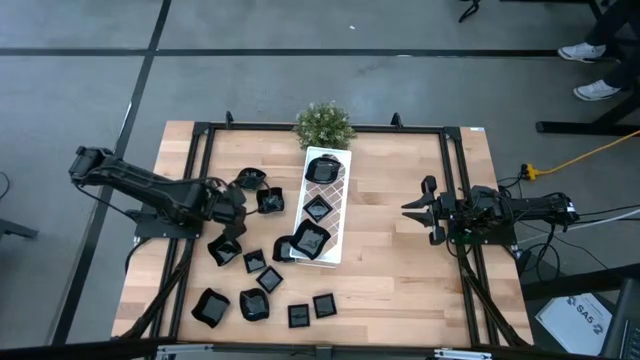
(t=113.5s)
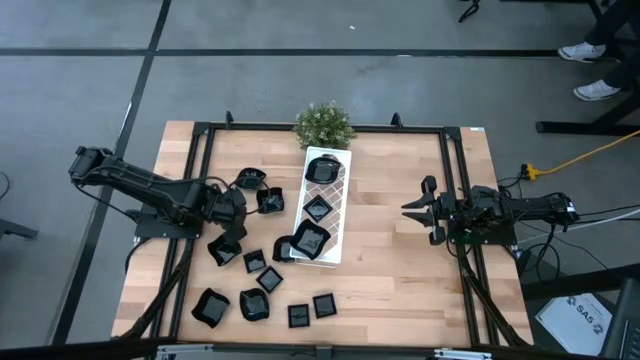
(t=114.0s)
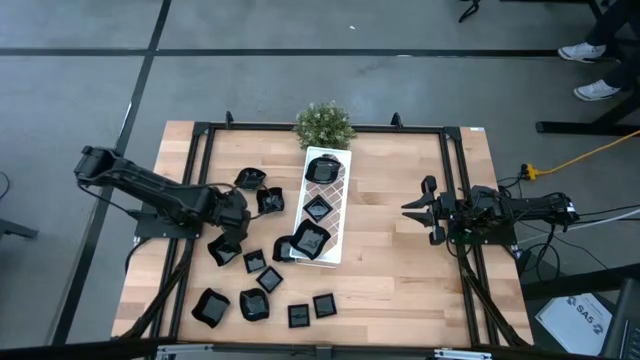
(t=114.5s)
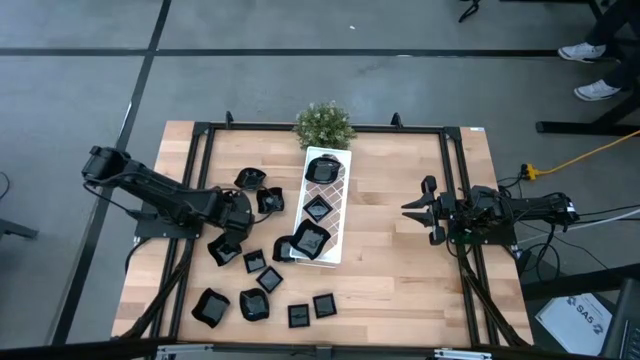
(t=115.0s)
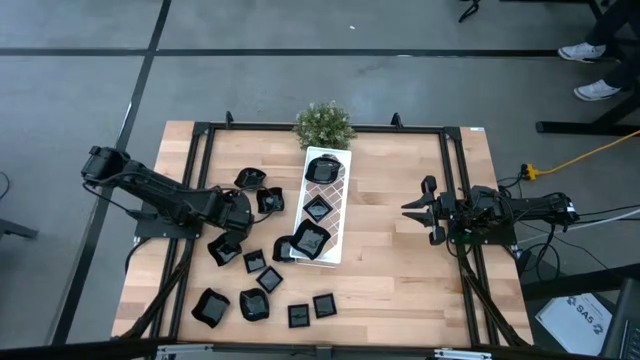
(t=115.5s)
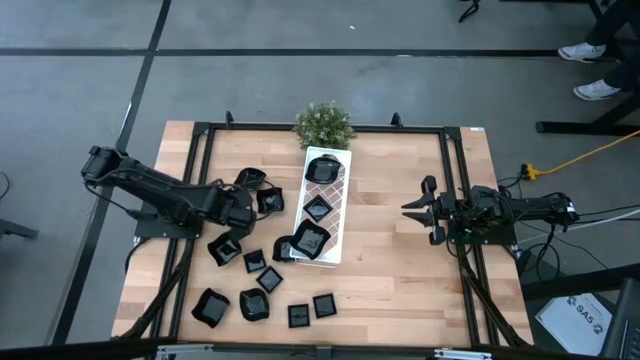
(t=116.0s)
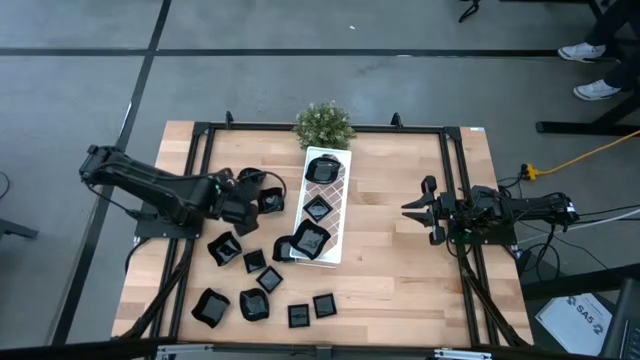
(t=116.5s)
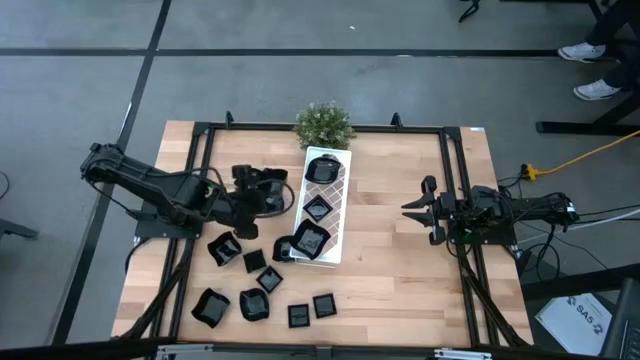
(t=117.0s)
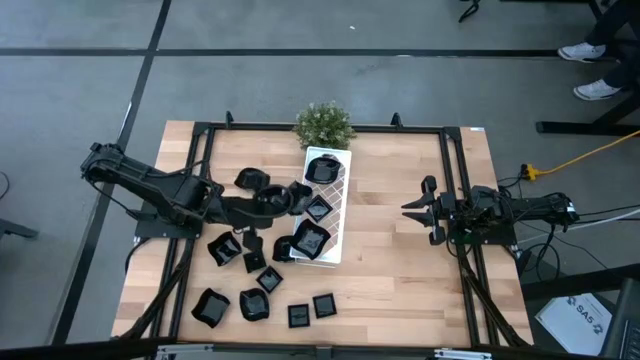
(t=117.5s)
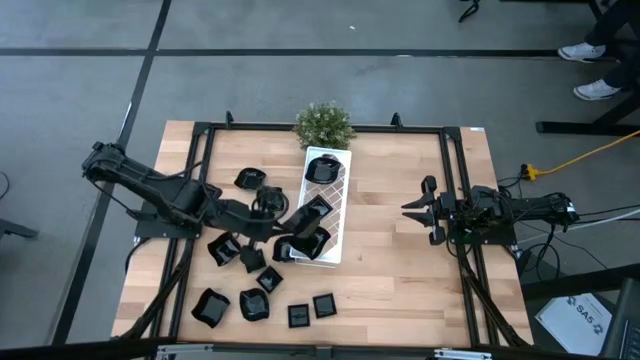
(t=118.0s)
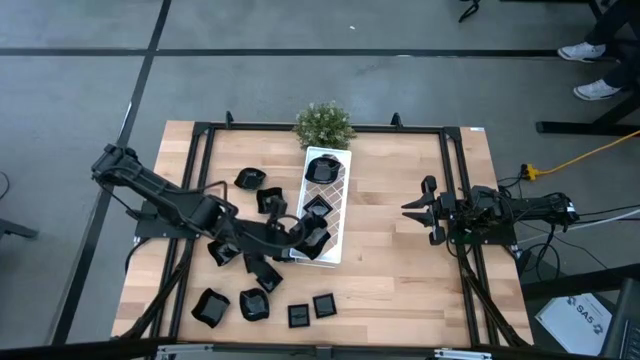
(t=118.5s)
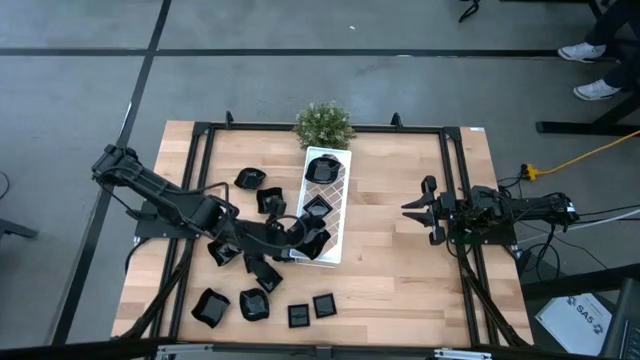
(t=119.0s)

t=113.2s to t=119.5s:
Task: Pick & Place Mini shaped plates
Stack the distorted square plate on top of the distorted square plate on the shelf

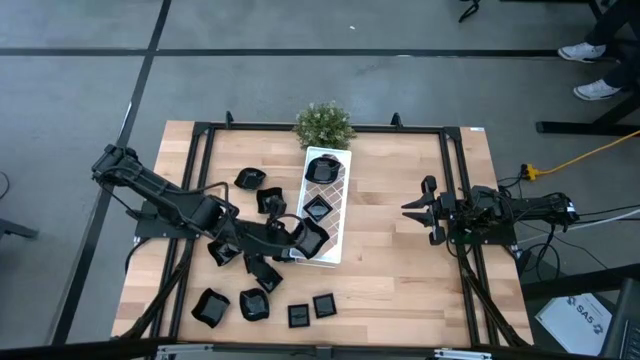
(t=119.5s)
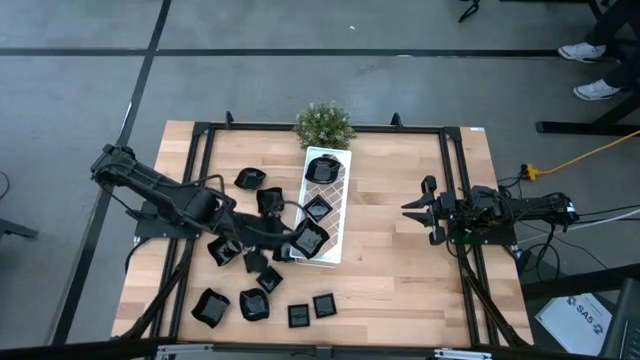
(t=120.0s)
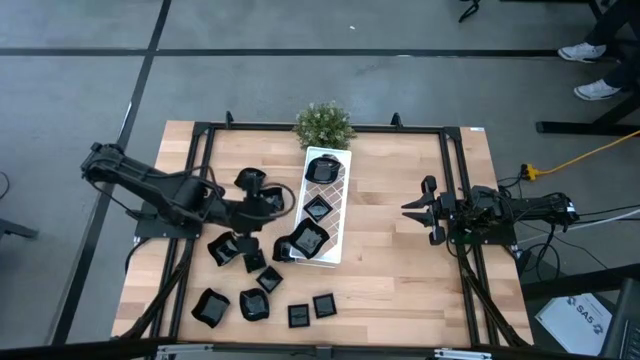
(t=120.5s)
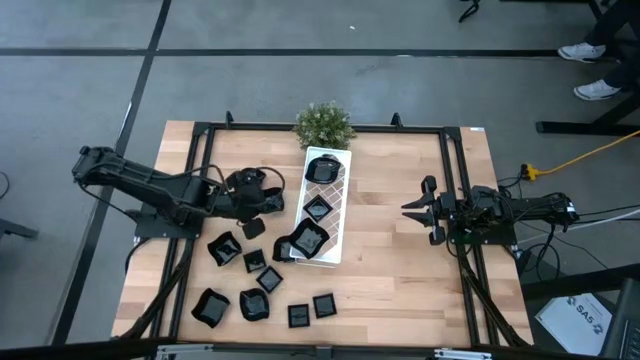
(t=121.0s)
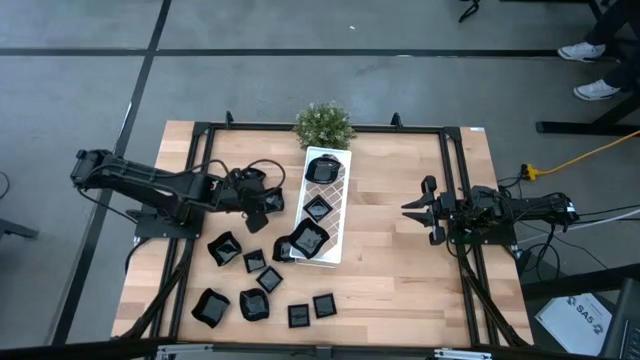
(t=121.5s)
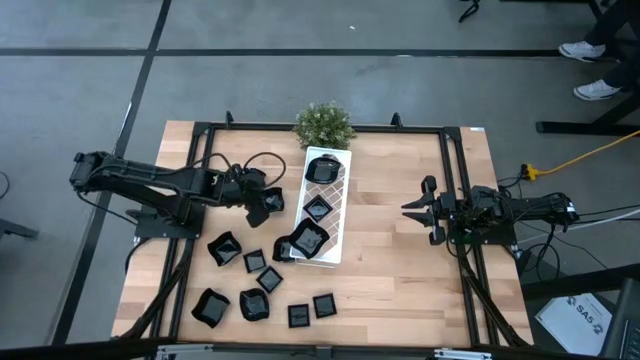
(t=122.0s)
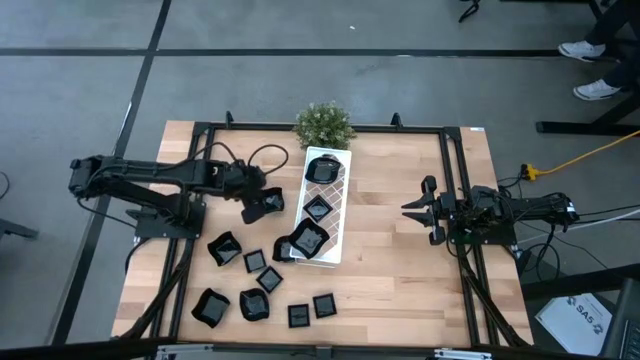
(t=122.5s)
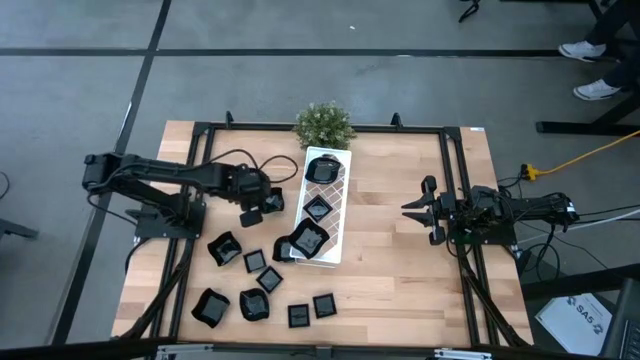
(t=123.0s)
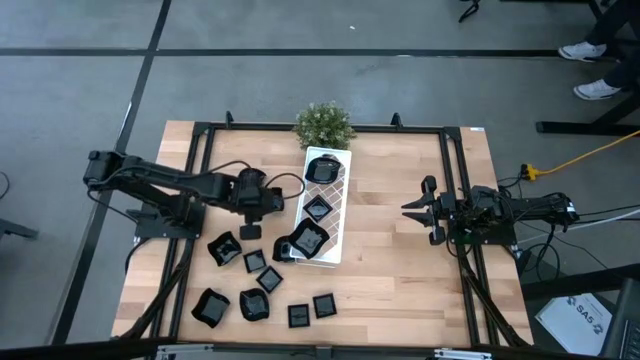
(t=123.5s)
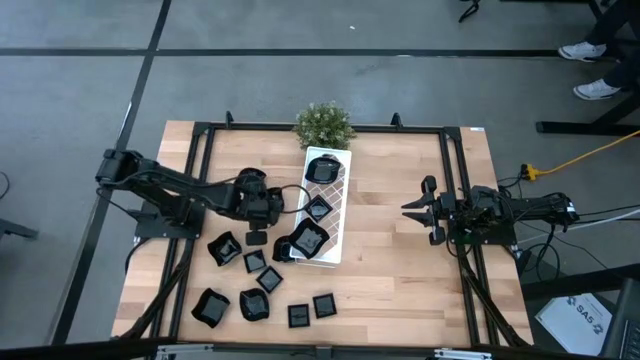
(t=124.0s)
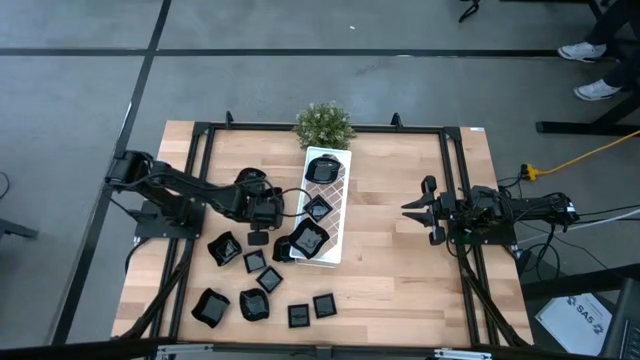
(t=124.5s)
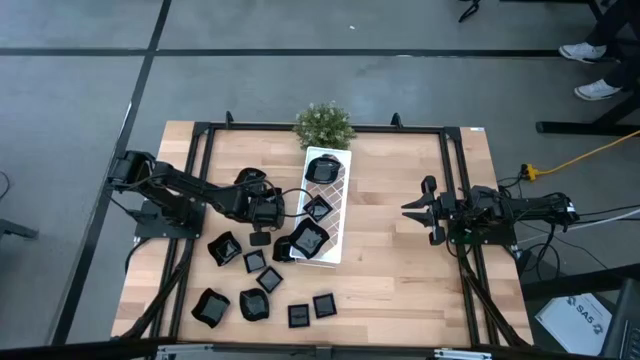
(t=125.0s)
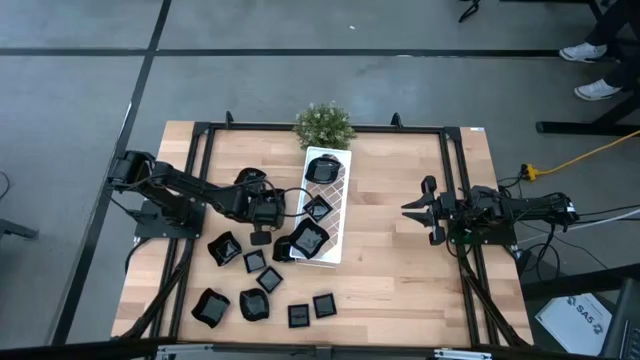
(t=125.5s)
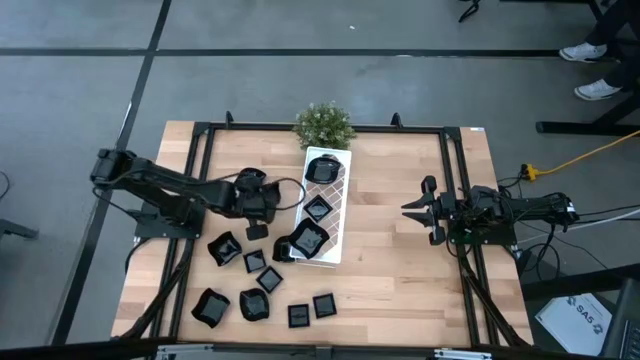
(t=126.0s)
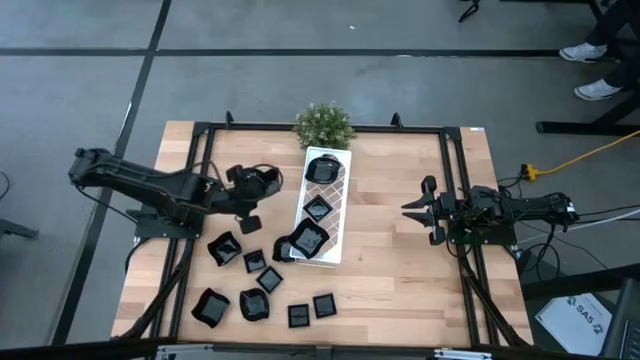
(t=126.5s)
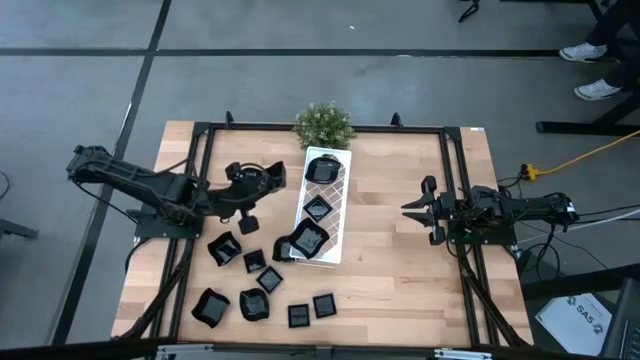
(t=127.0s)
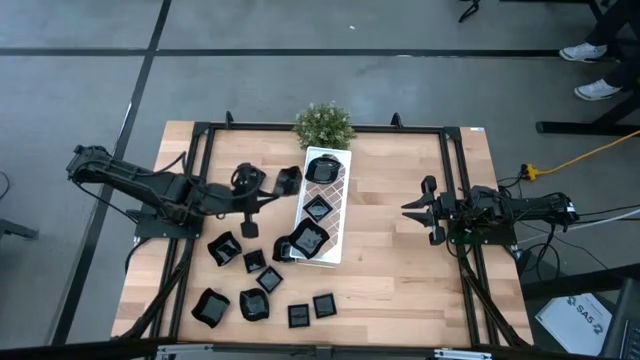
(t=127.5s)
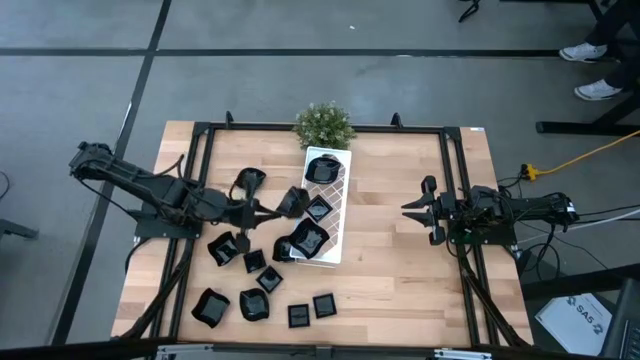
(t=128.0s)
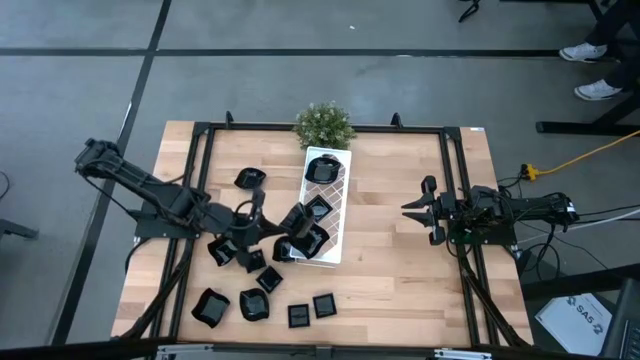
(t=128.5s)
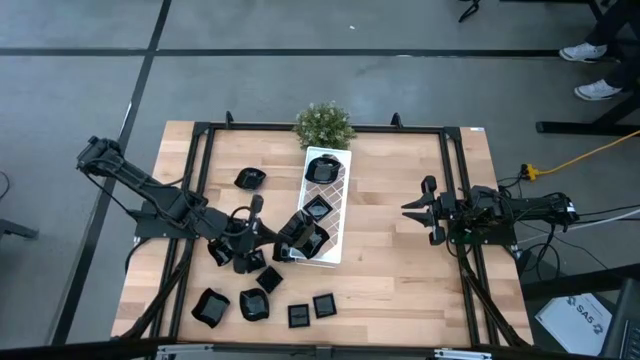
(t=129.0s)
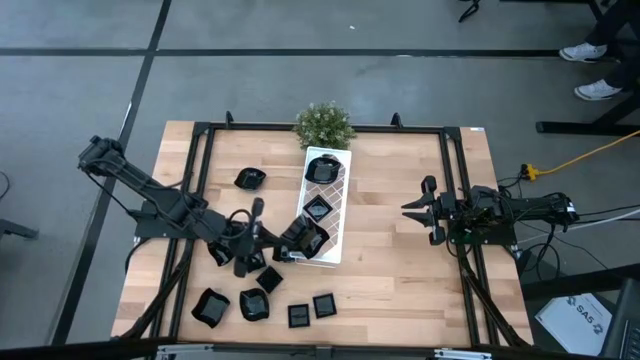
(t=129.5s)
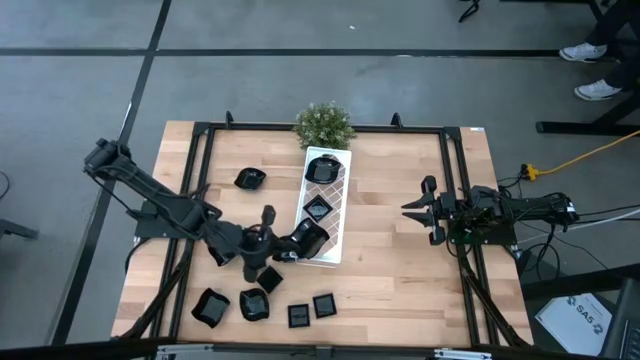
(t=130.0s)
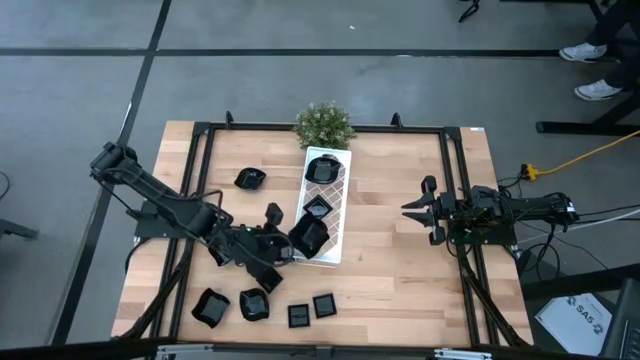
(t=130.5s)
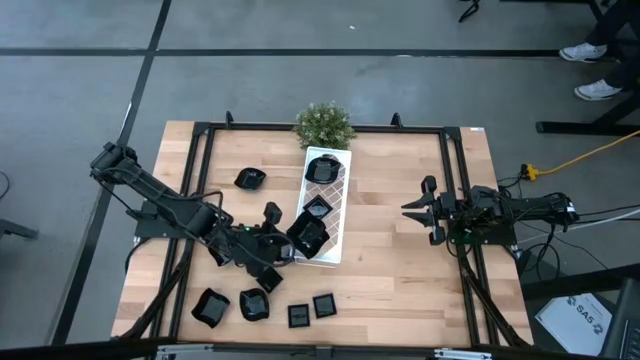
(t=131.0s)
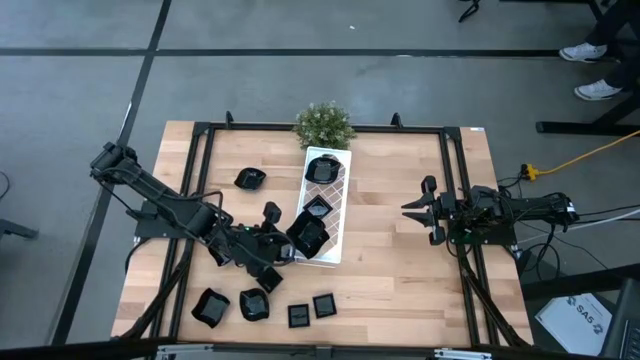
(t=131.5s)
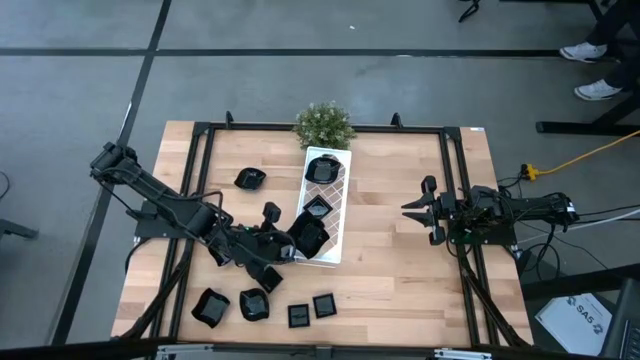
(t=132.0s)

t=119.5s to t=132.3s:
Stack the top distorted square plate on top of the distorted square plate on the shelf

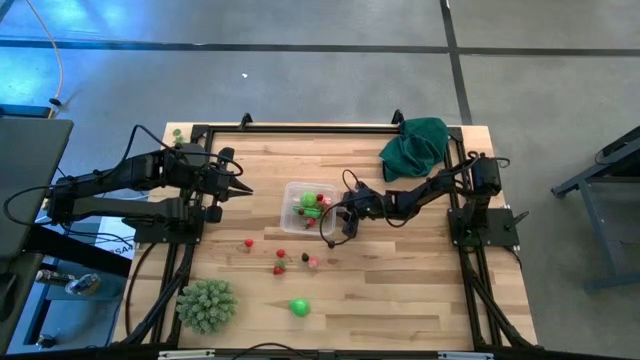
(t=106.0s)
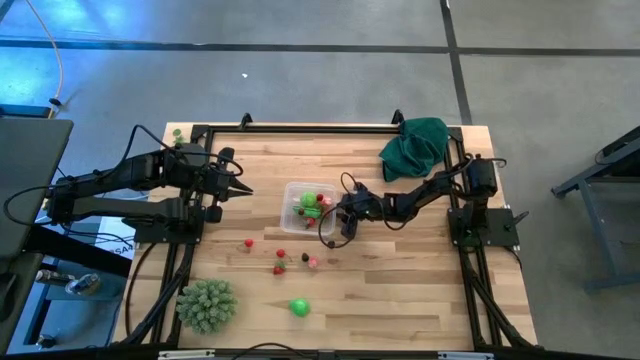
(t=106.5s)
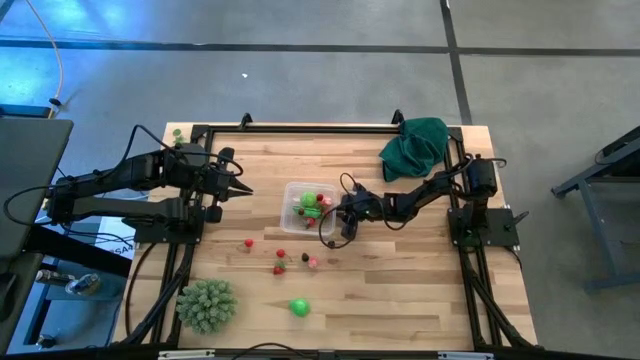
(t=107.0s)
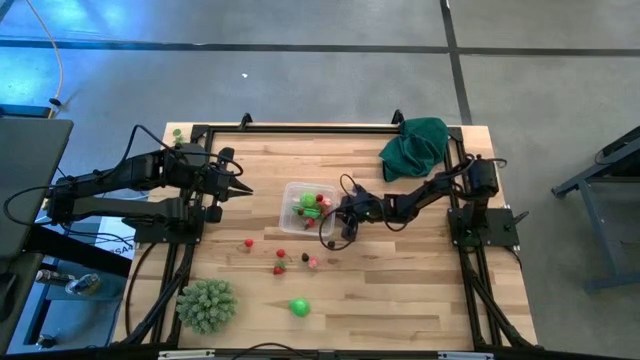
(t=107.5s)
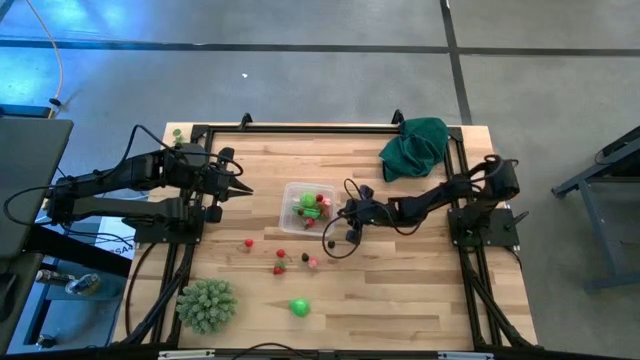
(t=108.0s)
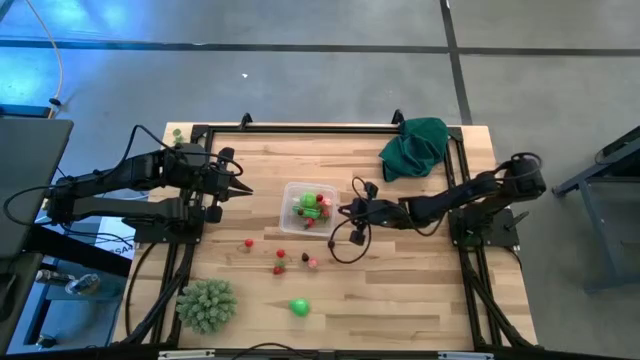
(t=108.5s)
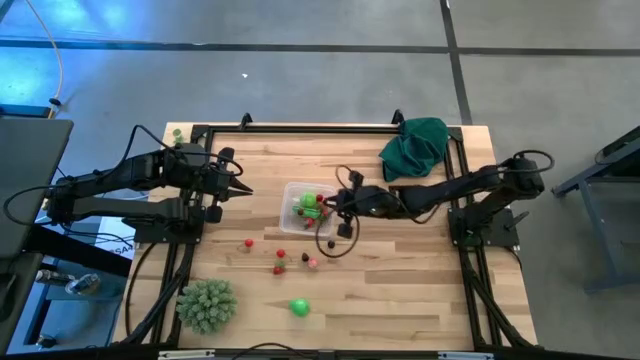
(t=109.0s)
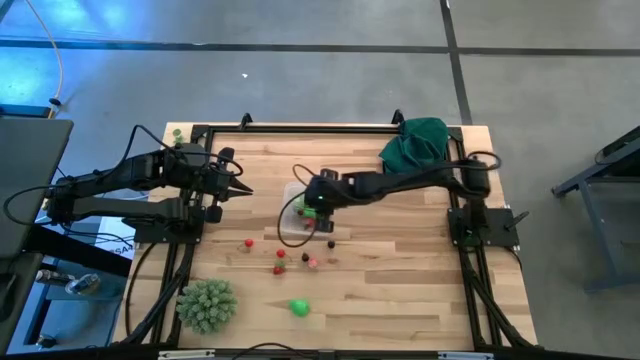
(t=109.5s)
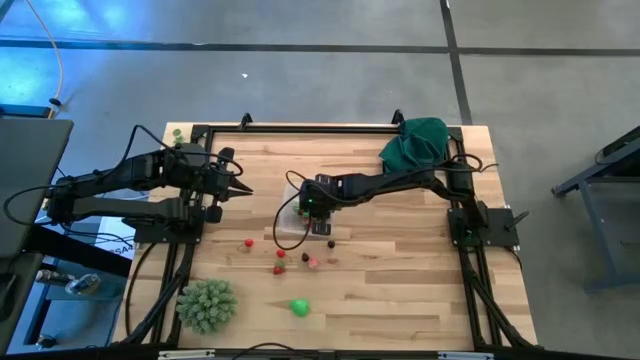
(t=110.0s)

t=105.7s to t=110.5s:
Task: Pick and placing Produce into tupperware
Put the blueberry into the transparent container
